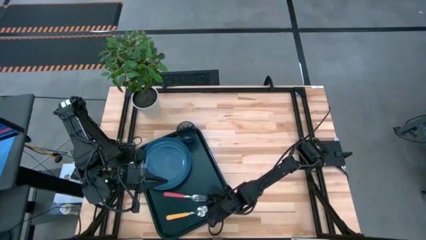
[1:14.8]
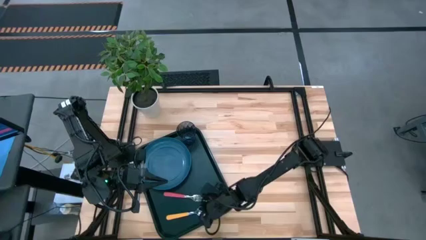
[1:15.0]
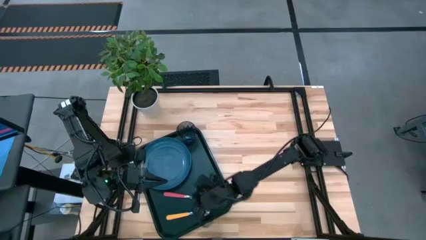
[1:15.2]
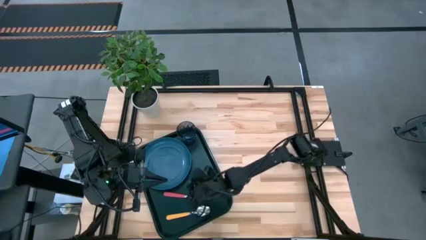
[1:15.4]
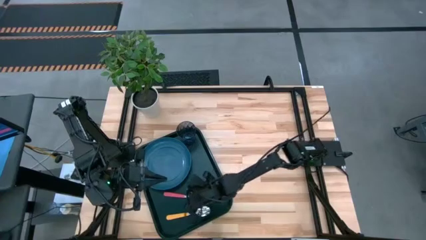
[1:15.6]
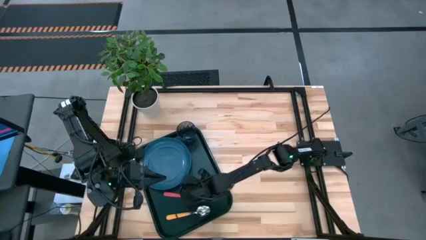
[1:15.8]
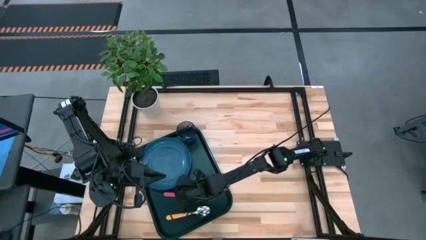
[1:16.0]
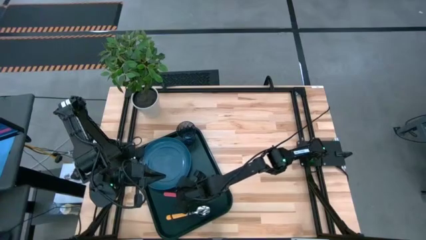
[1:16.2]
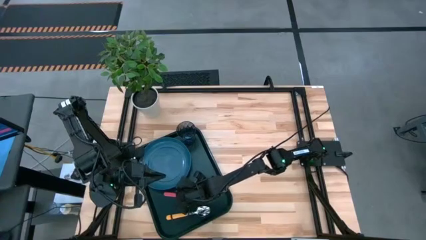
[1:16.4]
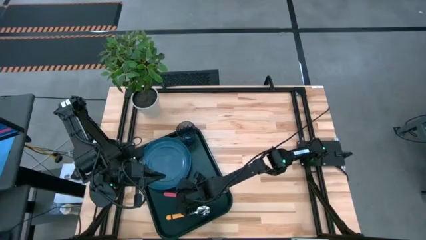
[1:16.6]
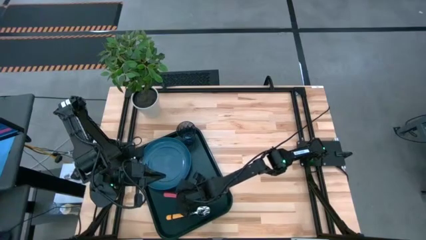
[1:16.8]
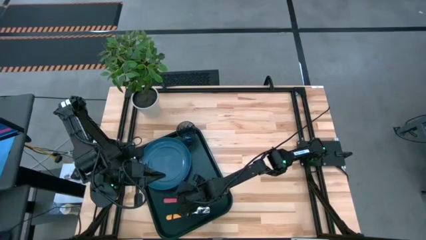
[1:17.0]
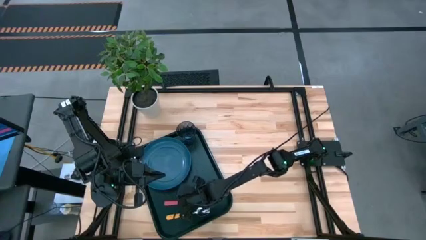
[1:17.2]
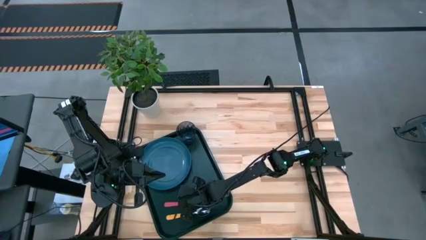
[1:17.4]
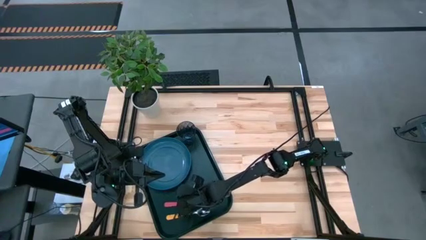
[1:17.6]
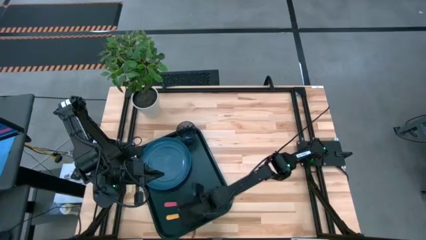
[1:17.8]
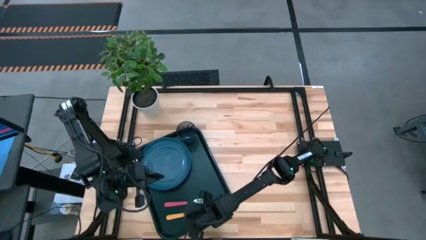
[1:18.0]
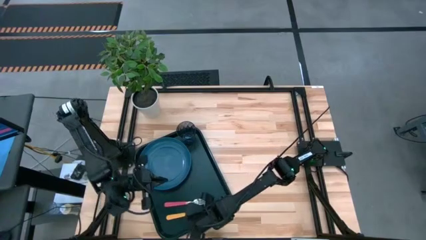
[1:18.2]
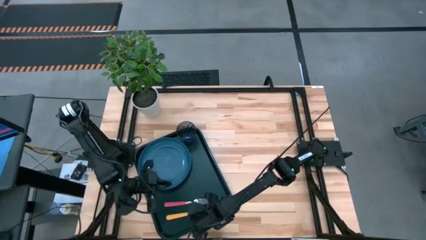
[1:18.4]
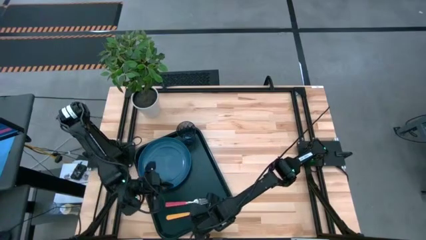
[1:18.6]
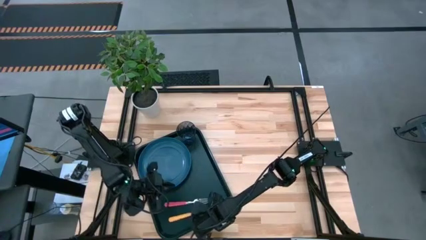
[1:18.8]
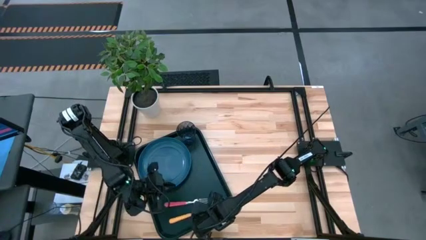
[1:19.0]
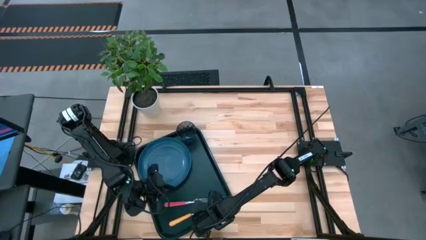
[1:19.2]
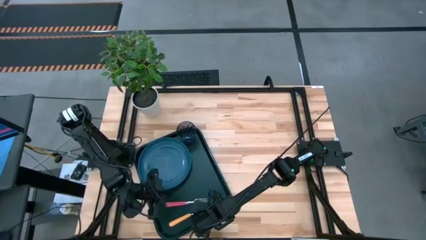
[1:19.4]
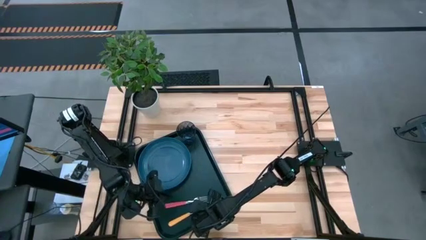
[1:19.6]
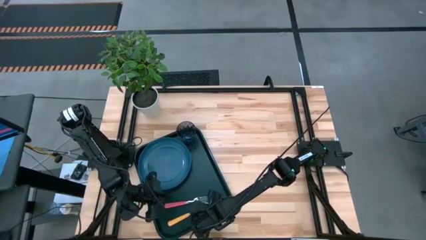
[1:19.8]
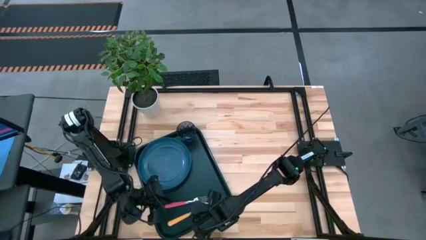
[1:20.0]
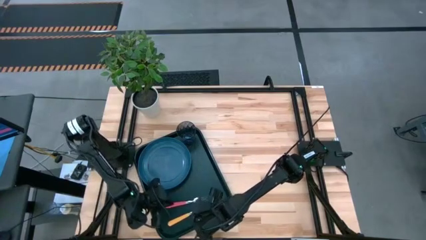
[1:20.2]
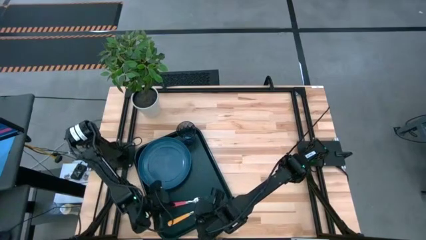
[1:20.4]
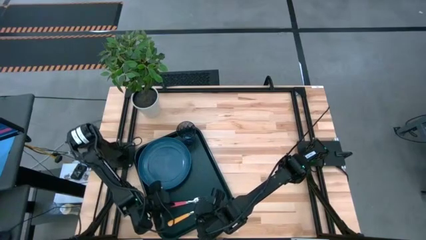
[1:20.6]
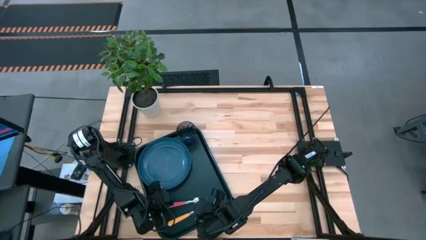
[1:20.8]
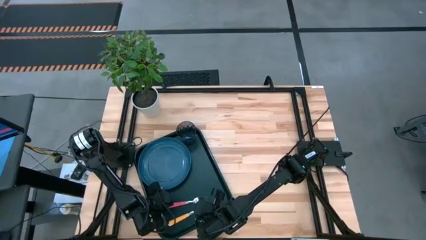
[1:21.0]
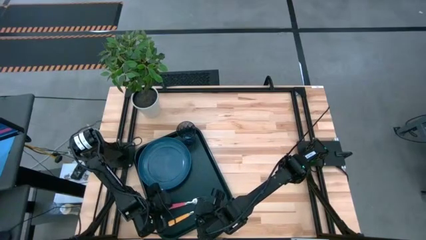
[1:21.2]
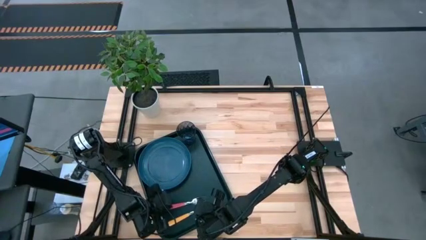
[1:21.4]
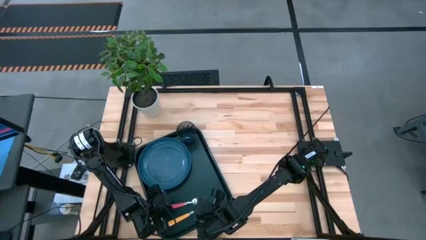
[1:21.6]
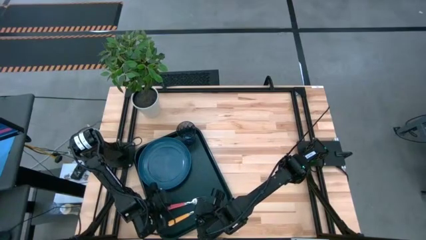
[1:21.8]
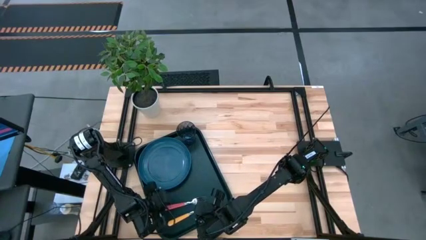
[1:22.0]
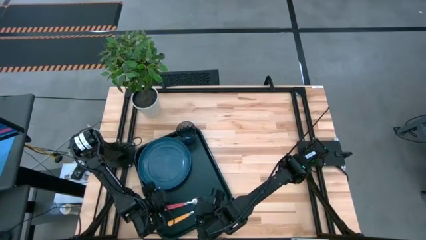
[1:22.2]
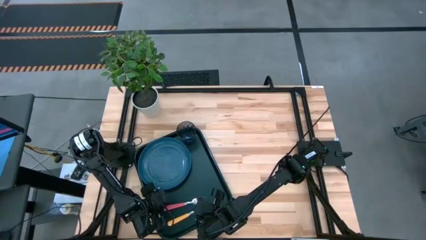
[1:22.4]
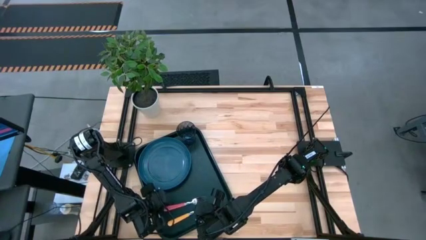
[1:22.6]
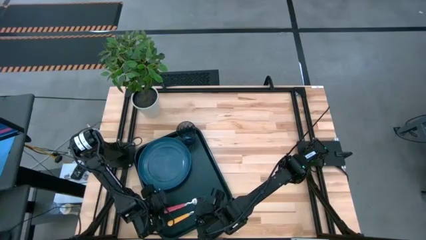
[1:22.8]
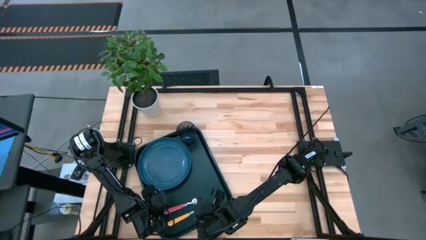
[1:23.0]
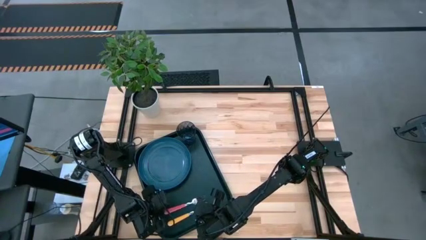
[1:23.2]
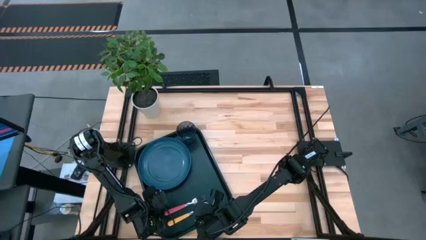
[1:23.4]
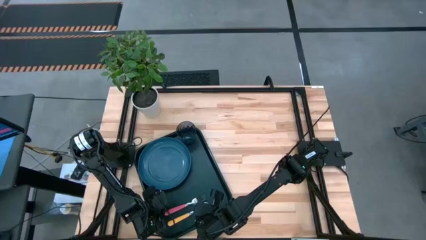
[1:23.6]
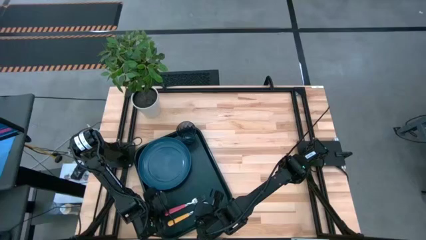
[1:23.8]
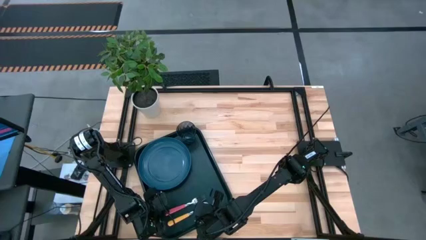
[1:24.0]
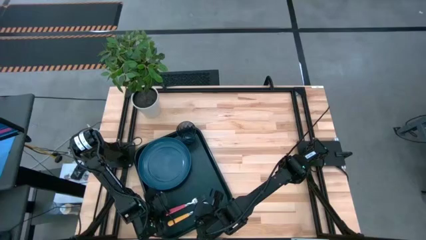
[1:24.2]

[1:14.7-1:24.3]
Task: Pick and place plate/cup/fork/spoon on tray
Adjust the silverware on the black tray

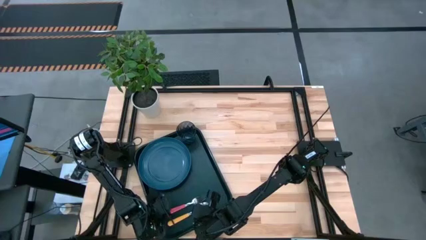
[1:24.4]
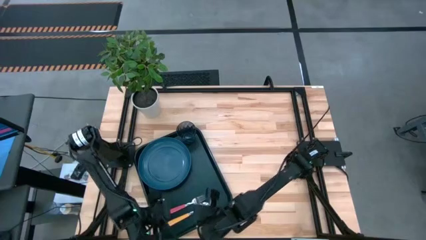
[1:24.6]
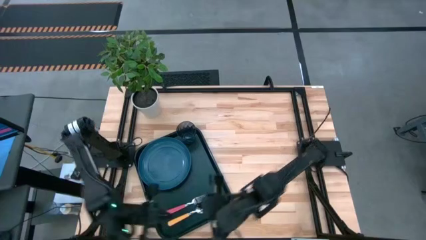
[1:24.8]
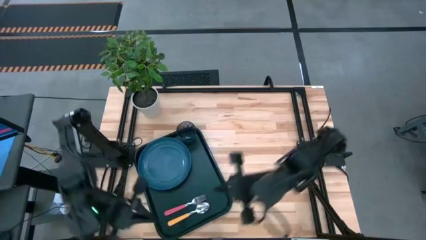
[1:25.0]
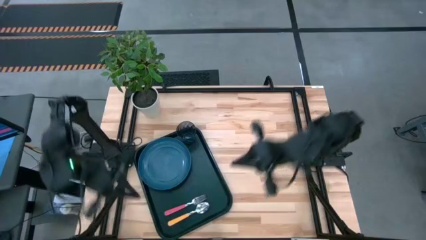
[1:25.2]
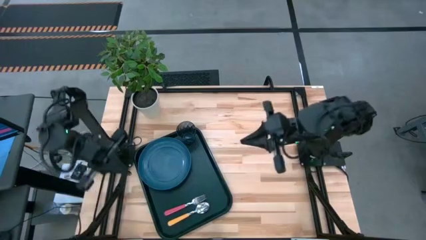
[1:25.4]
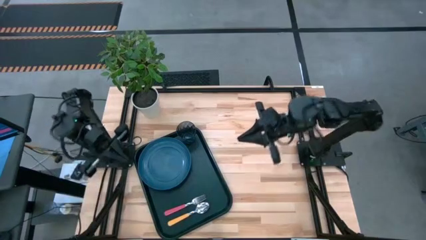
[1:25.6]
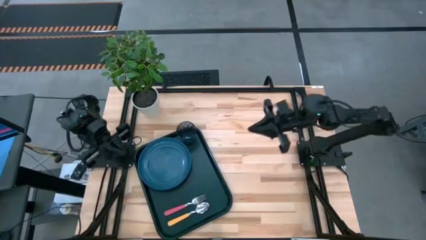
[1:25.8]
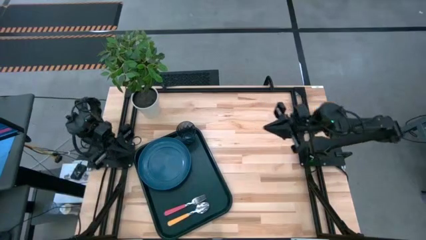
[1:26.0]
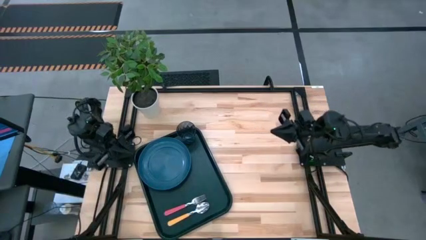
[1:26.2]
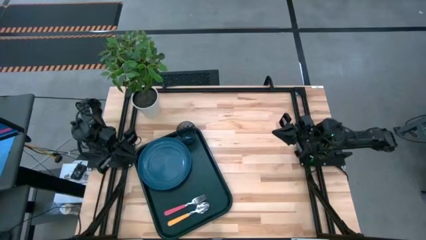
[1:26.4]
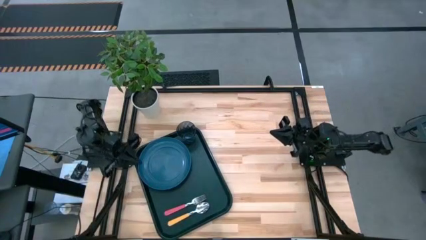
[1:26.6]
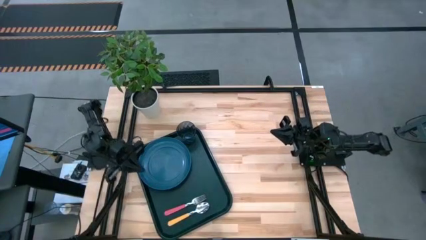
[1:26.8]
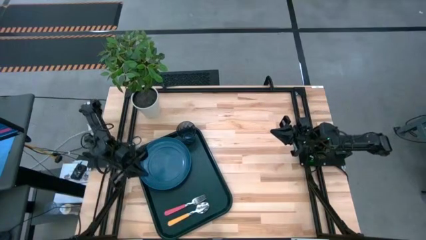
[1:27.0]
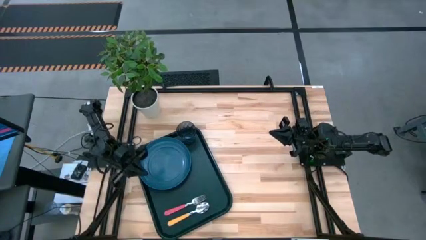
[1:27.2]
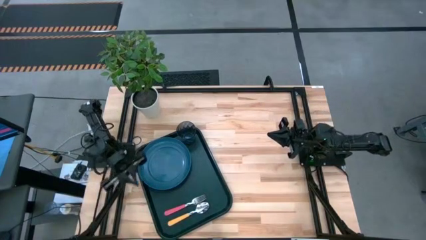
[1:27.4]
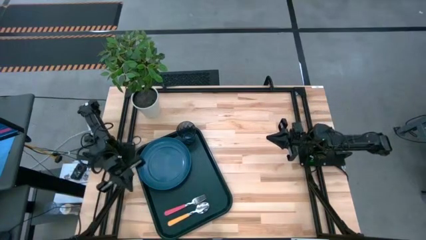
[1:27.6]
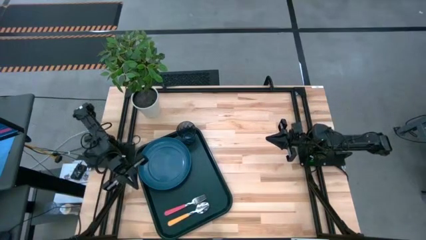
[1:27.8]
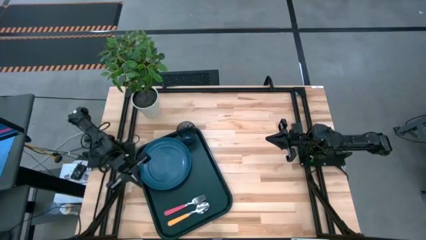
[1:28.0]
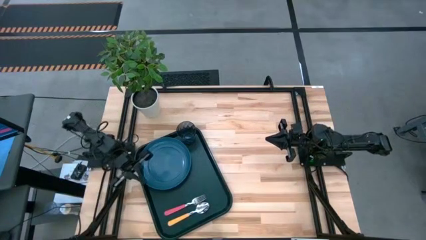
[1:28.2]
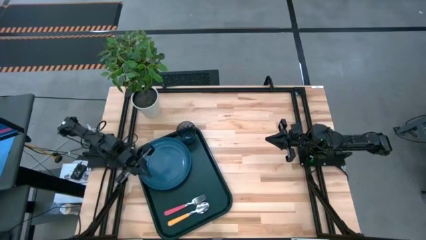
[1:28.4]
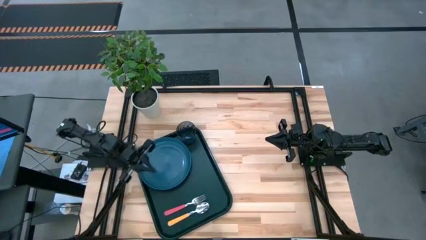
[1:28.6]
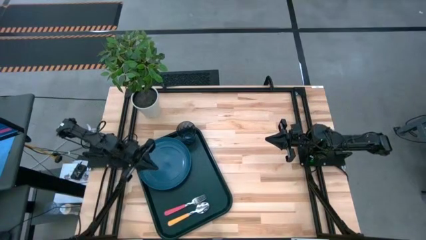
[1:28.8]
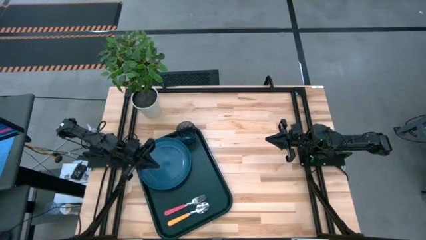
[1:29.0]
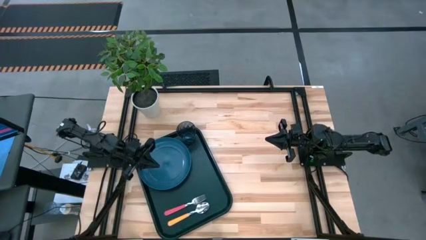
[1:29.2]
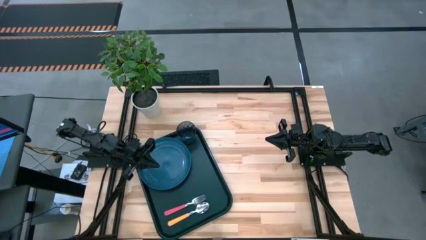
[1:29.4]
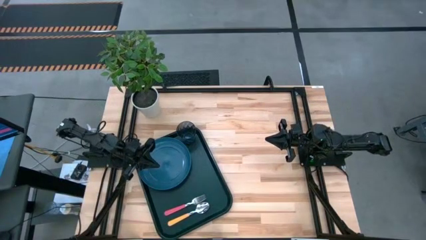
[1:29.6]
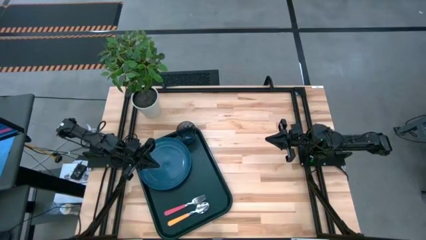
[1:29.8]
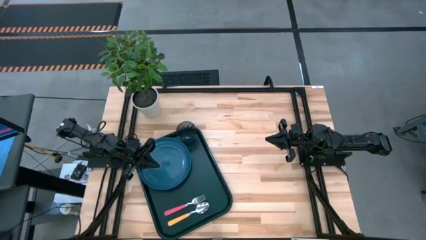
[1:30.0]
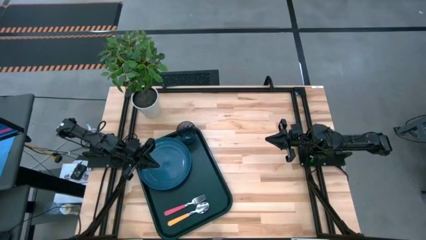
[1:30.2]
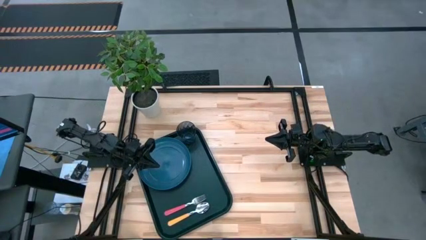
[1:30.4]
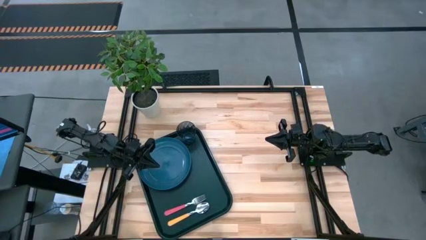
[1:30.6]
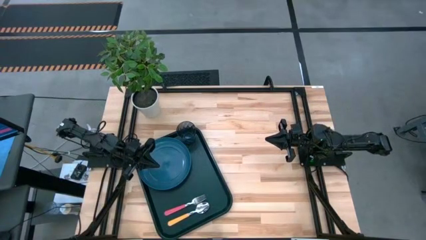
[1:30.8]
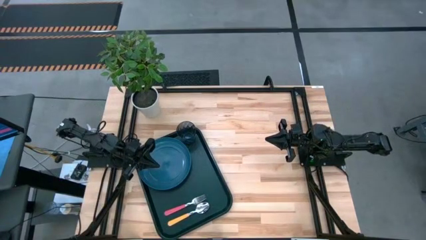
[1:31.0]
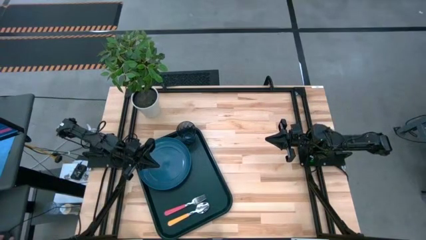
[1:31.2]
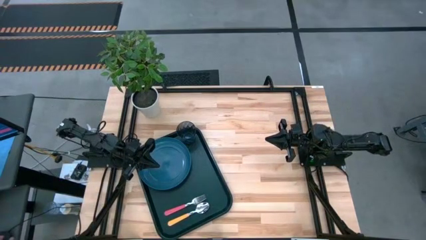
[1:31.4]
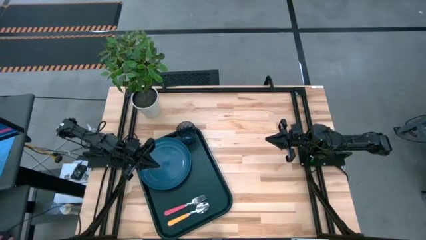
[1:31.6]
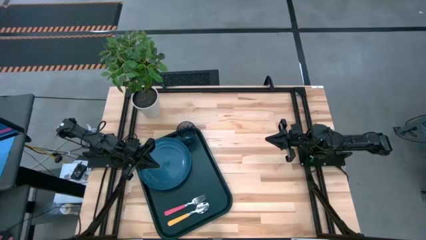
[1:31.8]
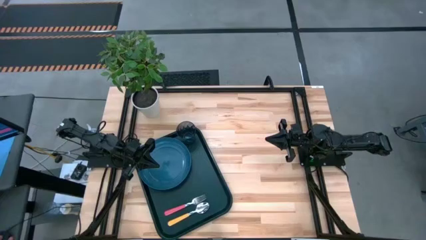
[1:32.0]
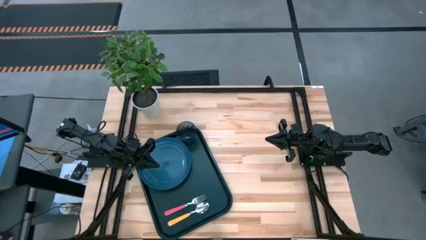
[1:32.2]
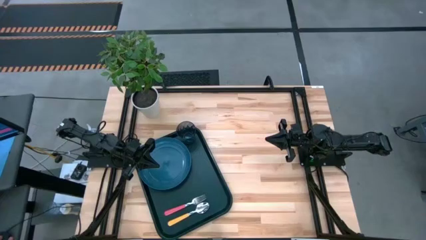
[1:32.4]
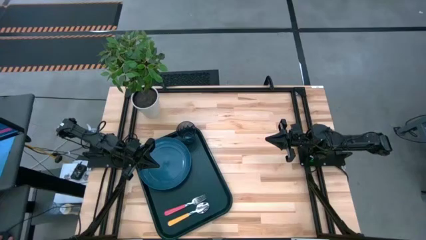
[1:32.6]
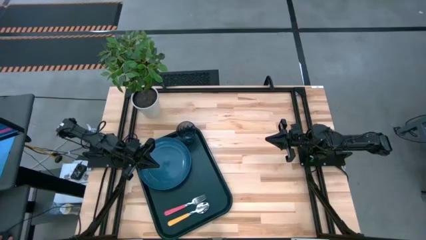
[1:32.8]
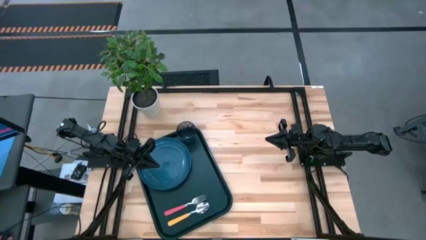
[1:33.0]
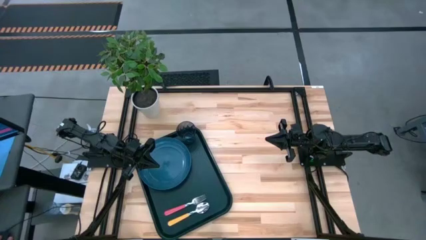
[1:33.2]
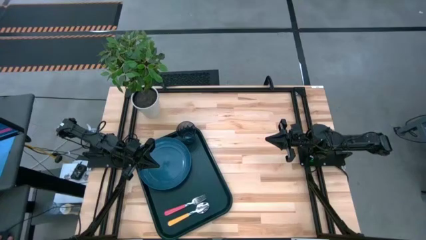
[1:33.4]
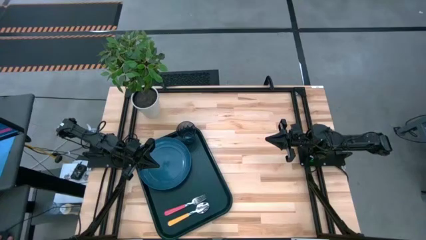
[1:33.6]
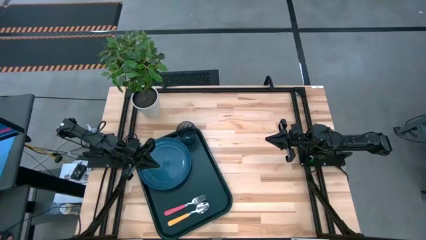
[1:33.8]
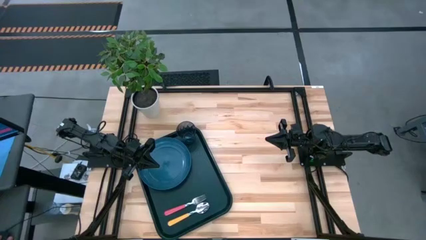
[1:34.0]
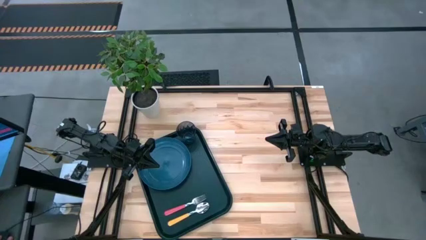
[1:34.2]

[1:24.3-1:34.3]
Return to Home Position
